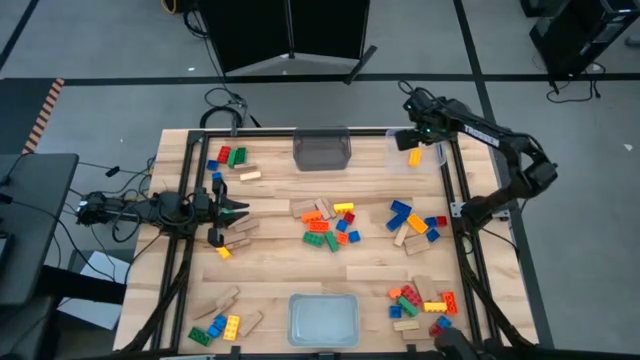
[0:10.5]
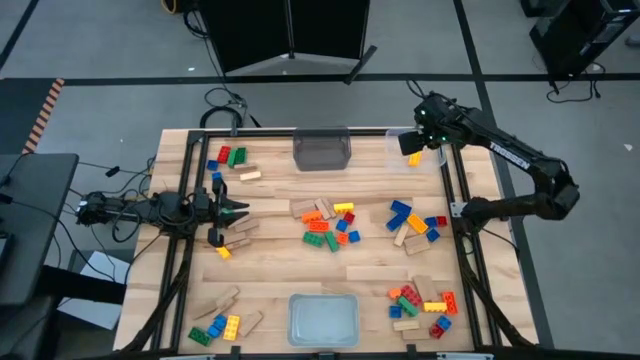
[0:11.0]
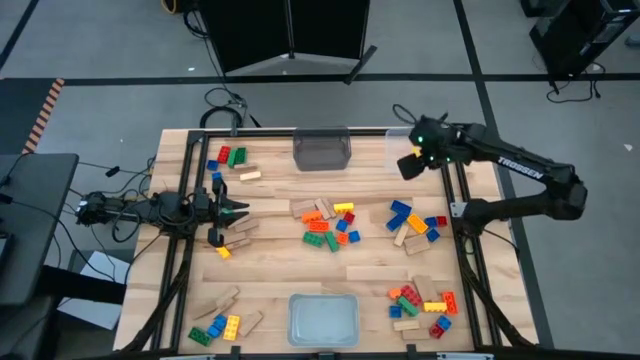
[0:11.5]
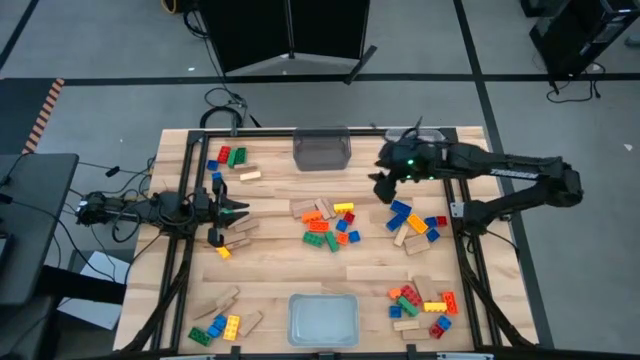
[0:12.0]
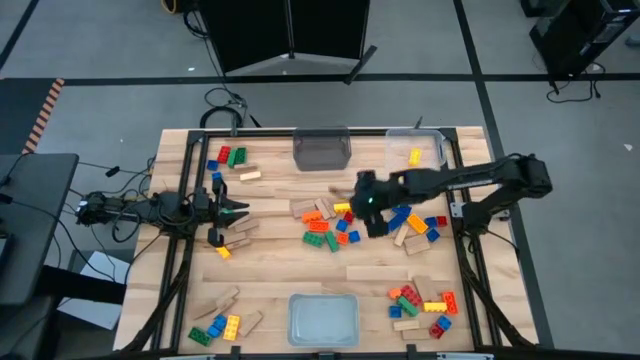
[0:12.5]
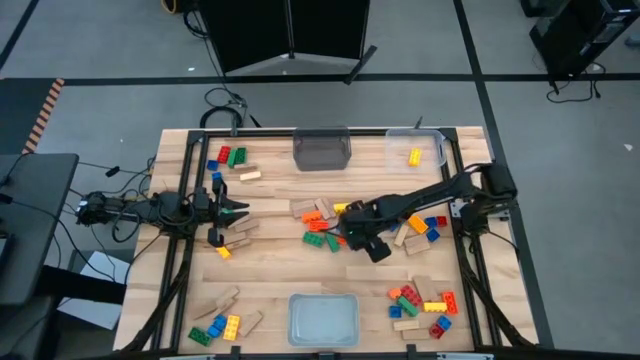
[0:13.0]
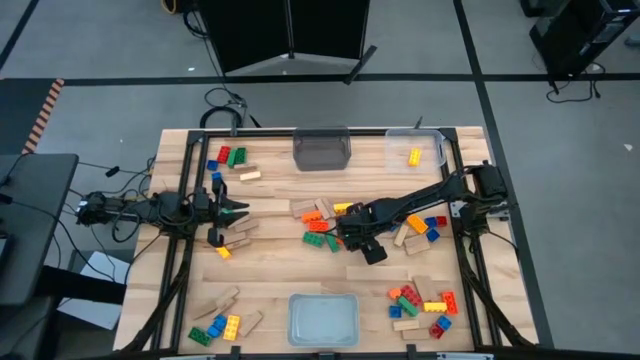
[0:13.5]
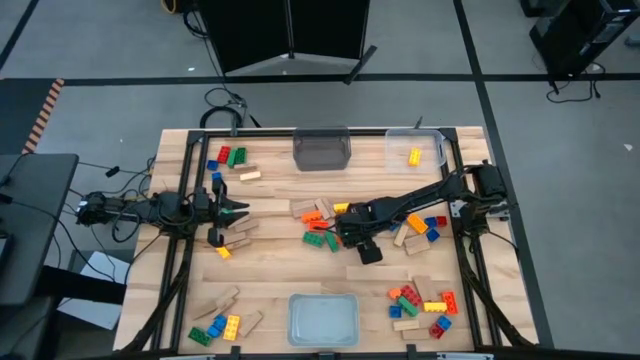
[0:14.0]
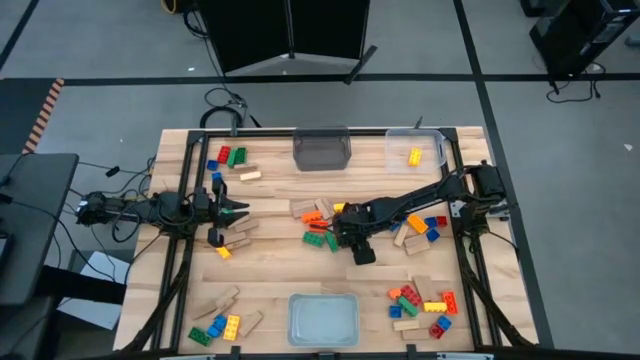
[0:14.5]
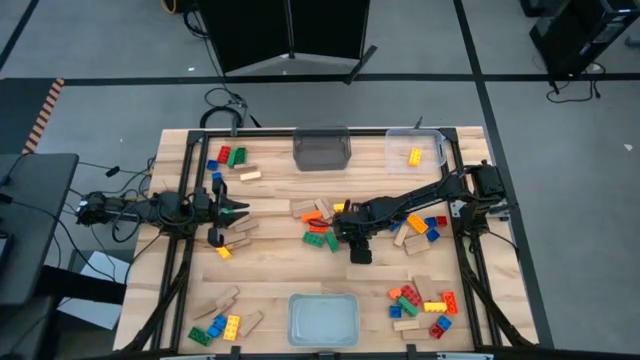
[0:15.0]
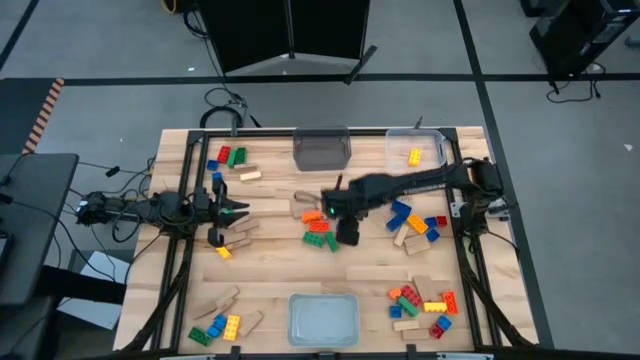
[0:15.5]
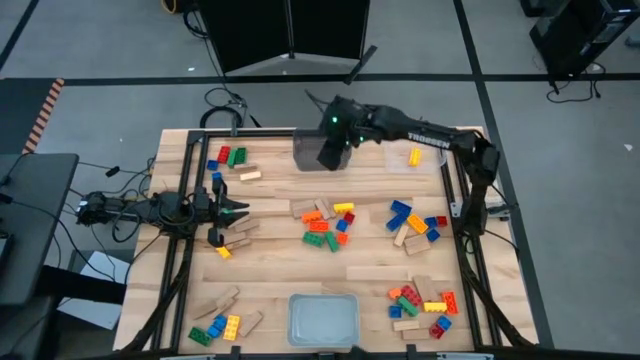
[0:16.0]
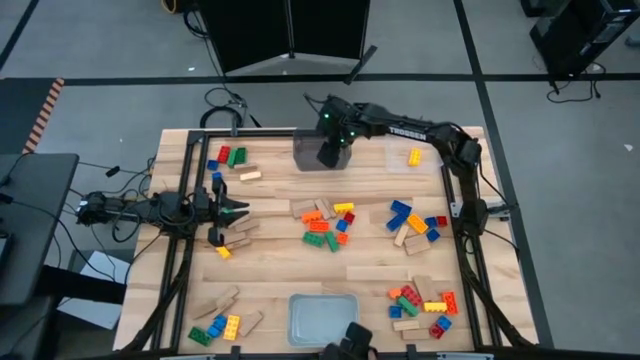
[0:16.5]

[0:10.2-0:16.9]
Task: Sort blocks by size
Put the small blue game piece into the black bin

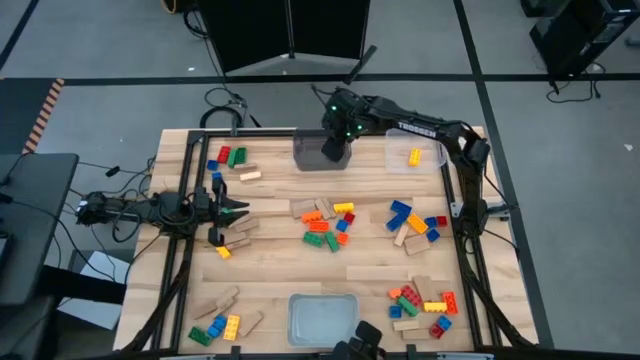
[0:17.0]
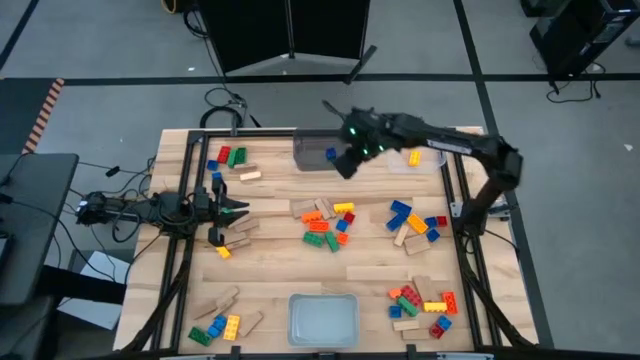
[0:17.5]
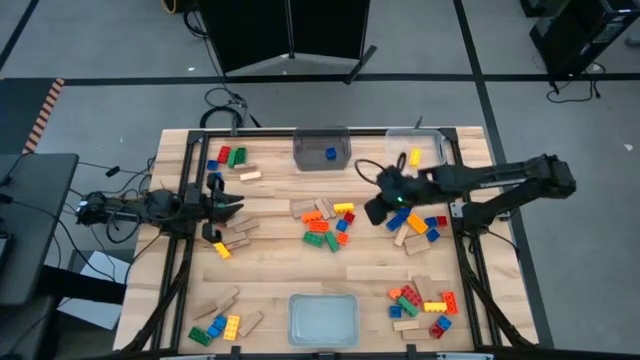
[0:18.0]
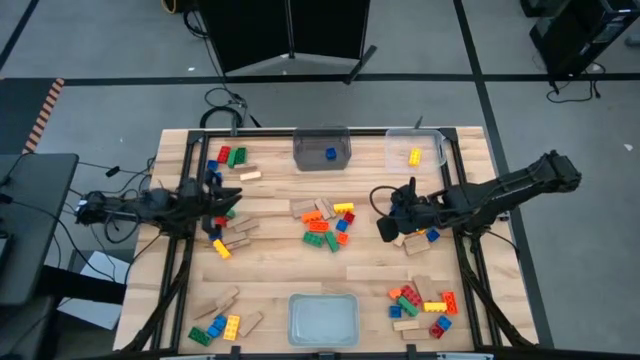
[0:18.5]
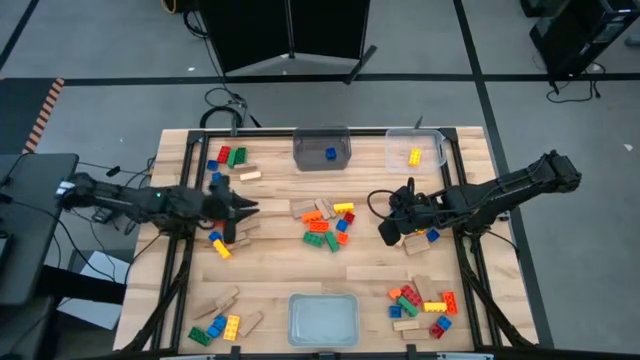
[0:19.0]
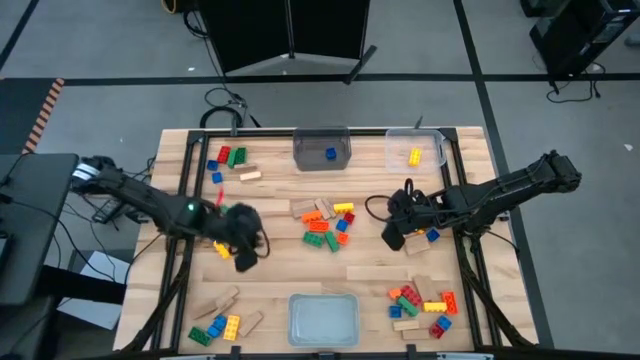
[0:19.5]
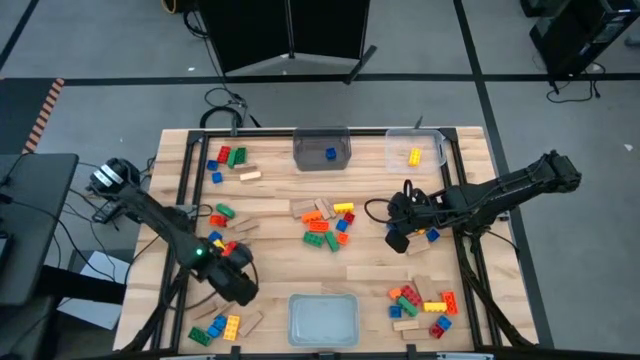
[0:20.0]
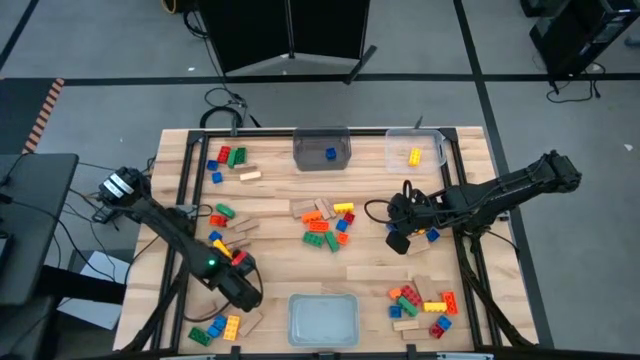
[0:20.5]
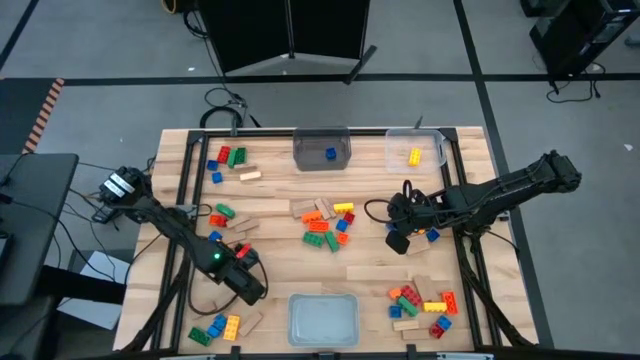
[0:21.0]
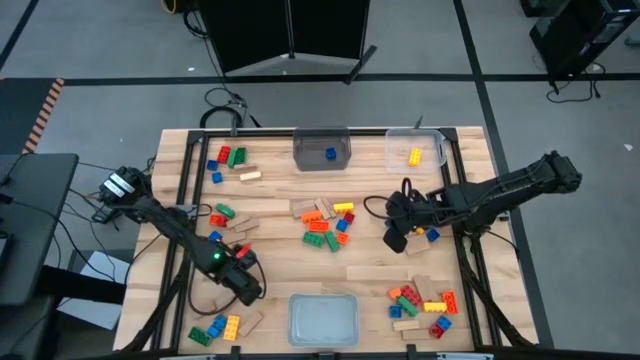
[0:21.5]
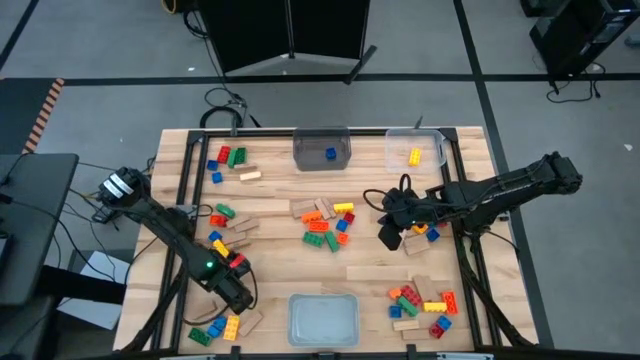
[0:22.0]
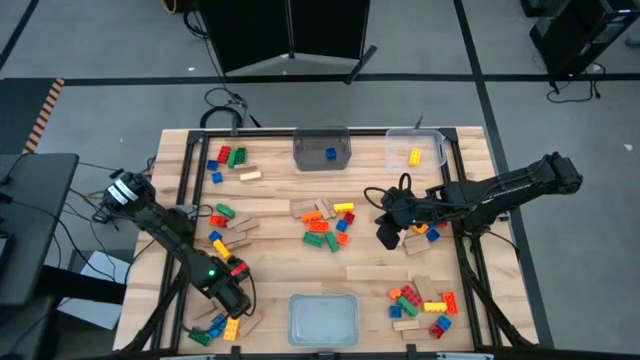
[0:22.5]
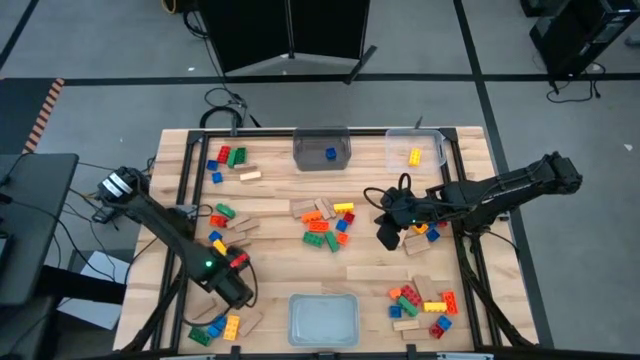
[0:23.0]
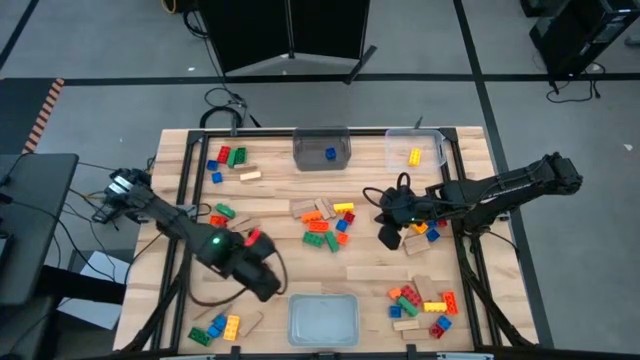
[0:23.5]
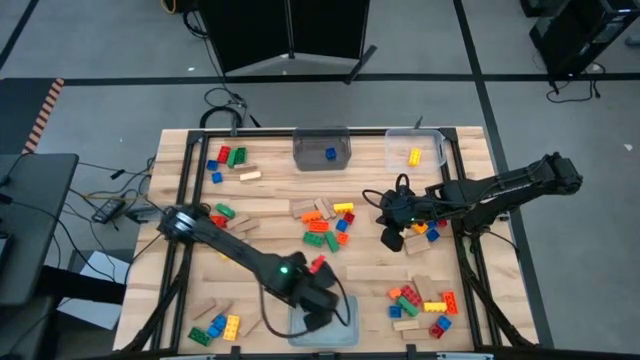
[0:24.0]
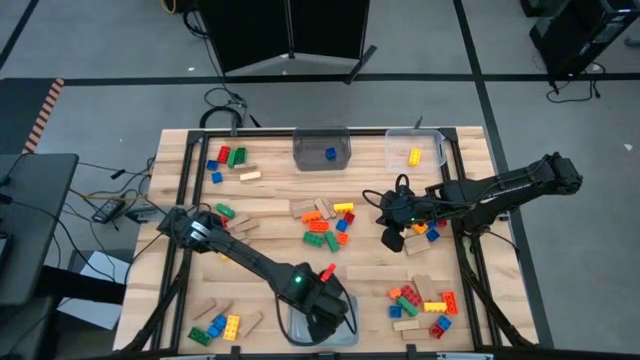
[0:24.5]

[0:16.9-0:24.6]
Put the brown block into the gray bin

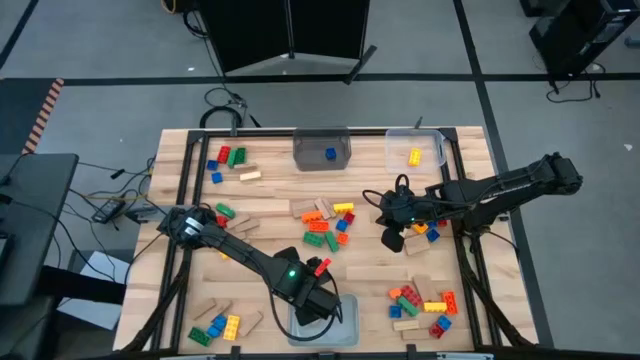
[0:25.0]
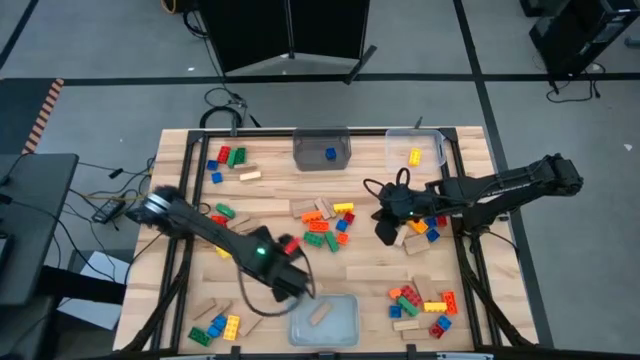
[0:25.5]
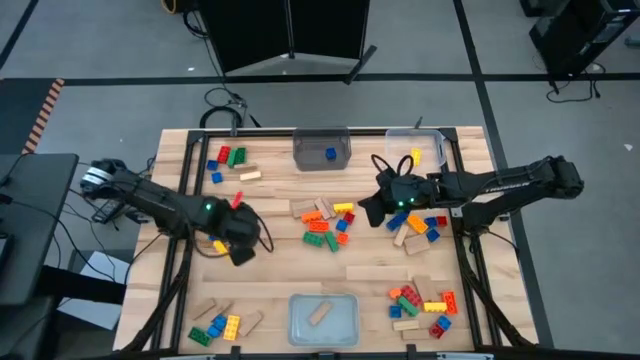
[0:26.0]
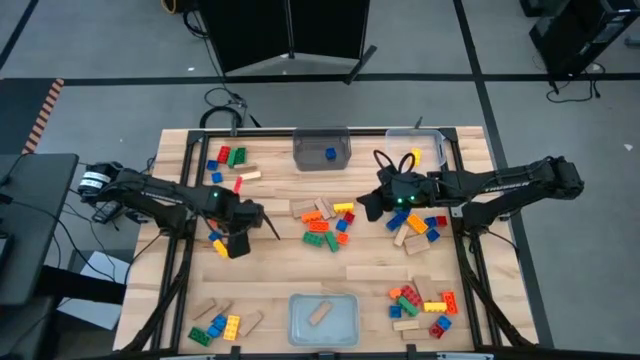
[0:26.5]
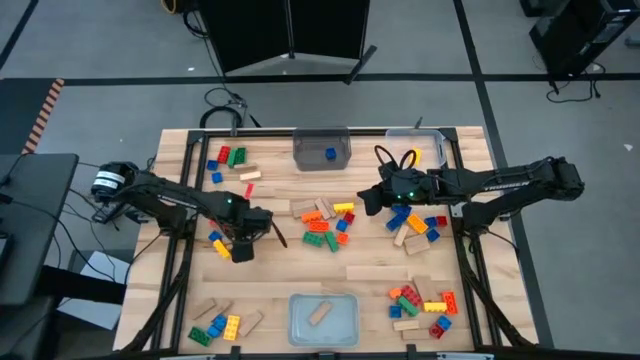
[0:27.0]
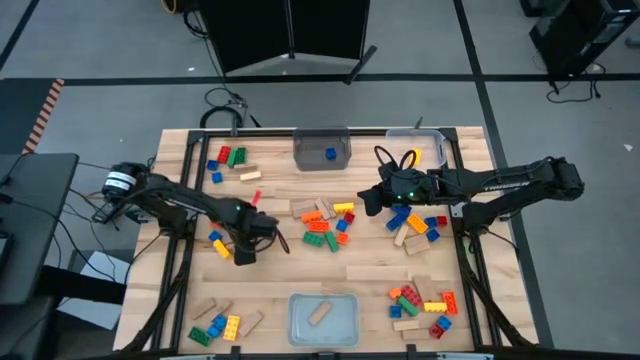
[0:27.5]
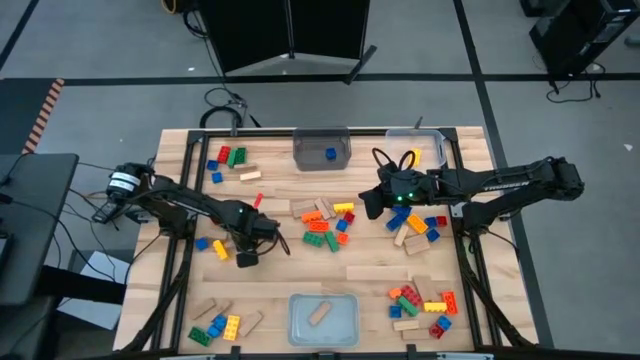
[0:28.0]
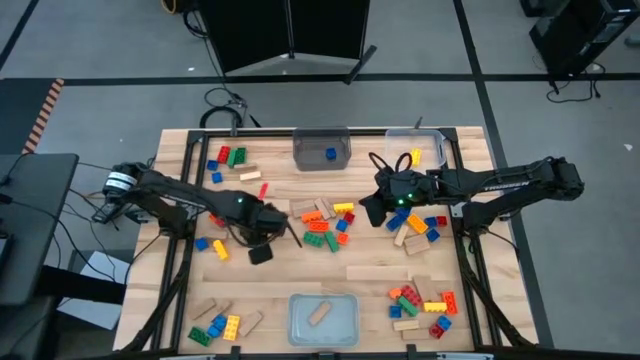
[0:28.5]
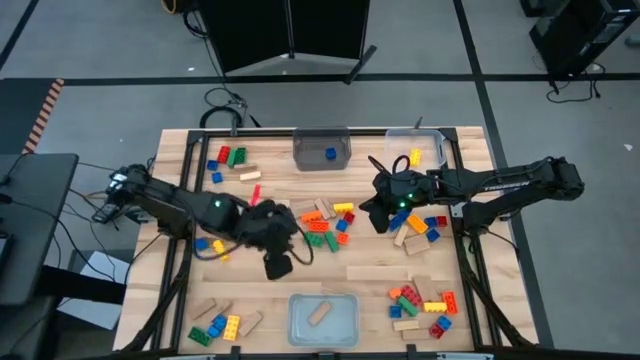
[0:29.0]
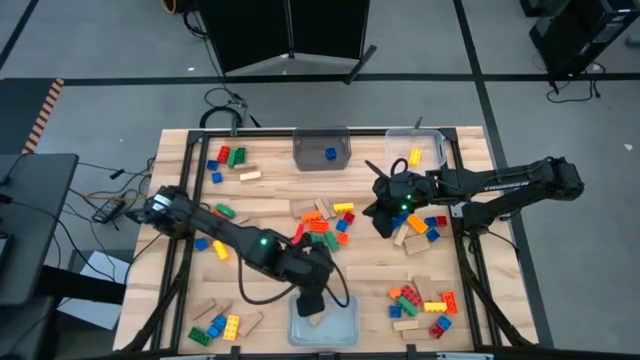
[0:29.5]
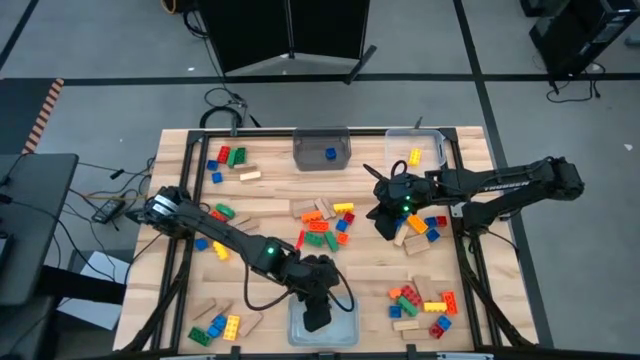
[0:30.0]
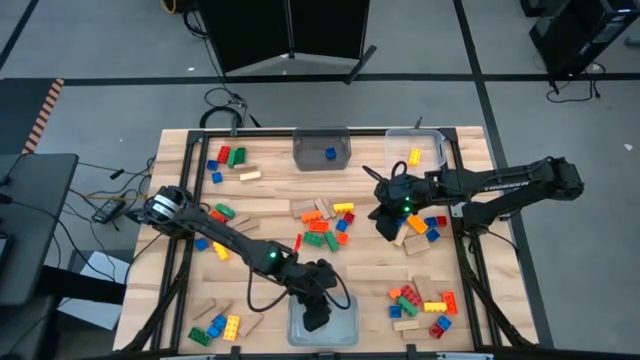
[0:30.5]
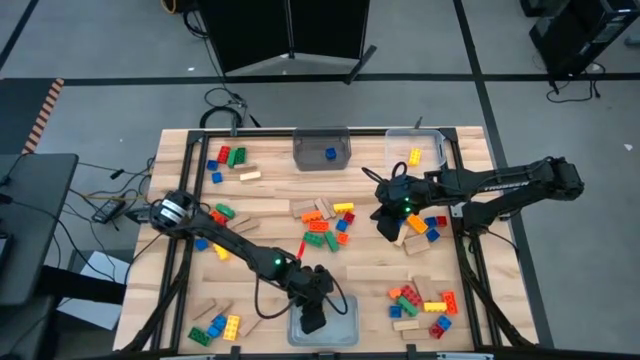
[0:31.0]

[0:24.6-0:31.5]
Put the brown block into the gray bin
